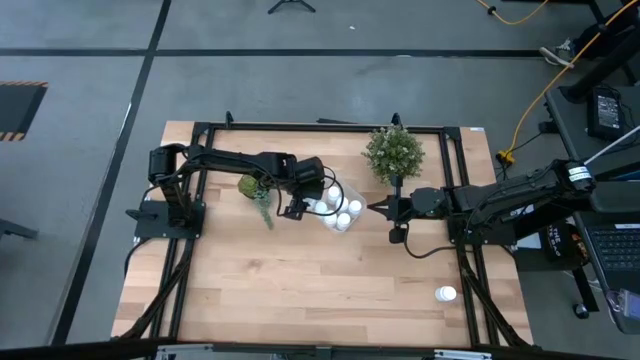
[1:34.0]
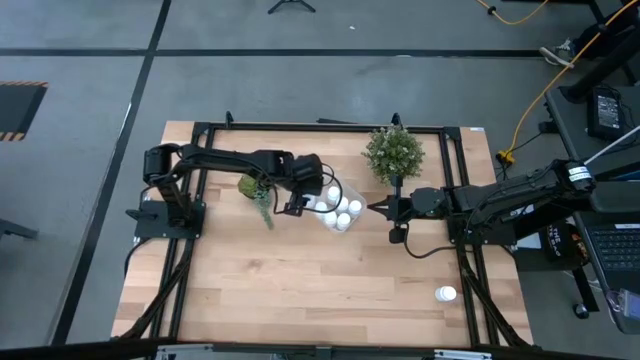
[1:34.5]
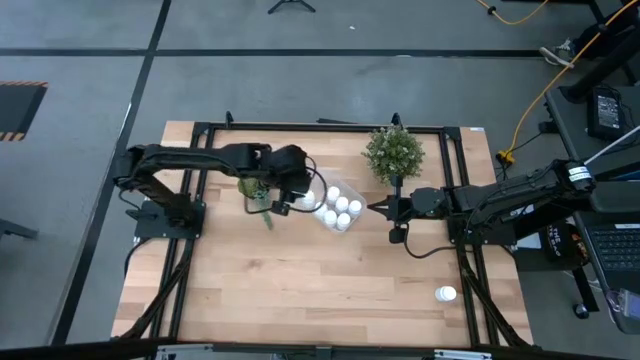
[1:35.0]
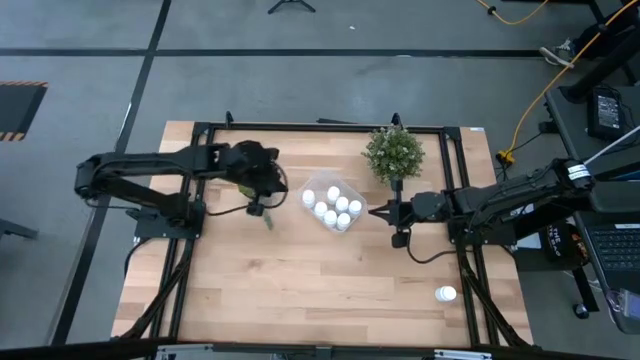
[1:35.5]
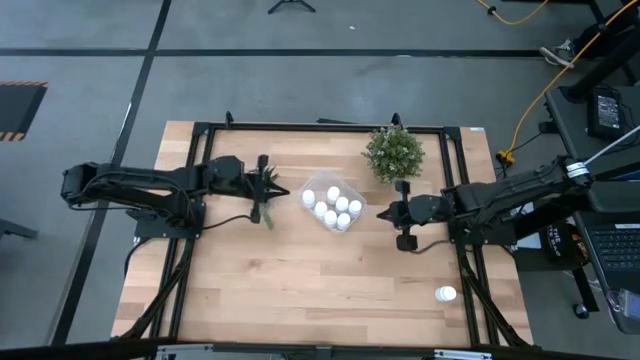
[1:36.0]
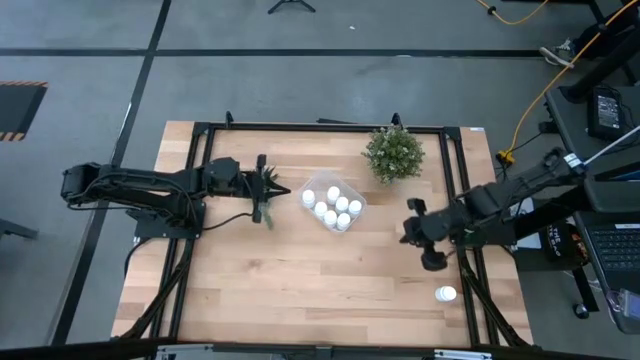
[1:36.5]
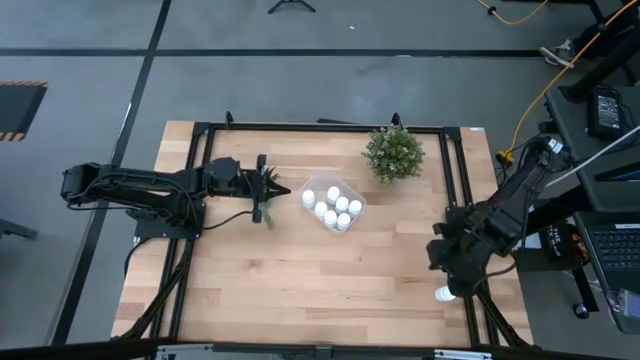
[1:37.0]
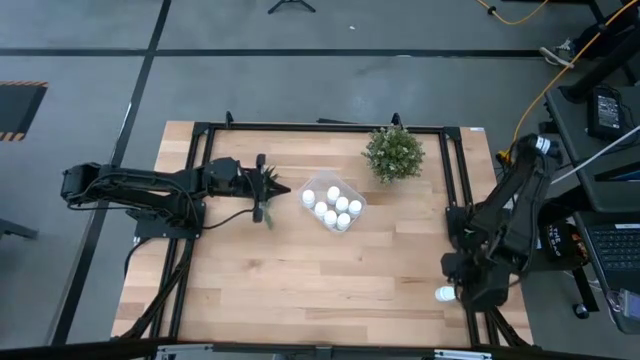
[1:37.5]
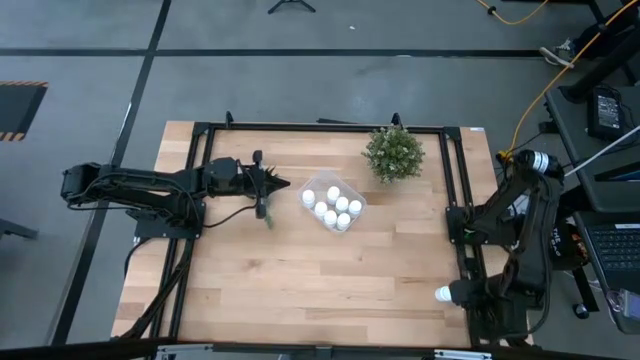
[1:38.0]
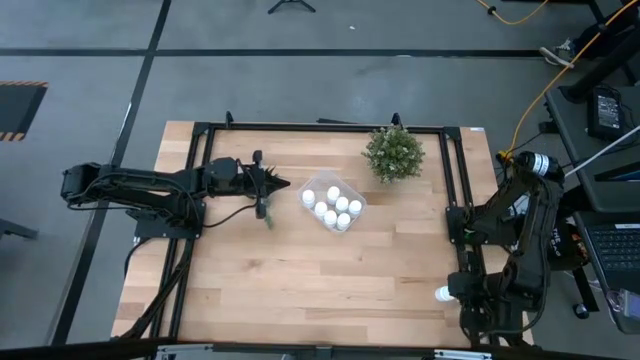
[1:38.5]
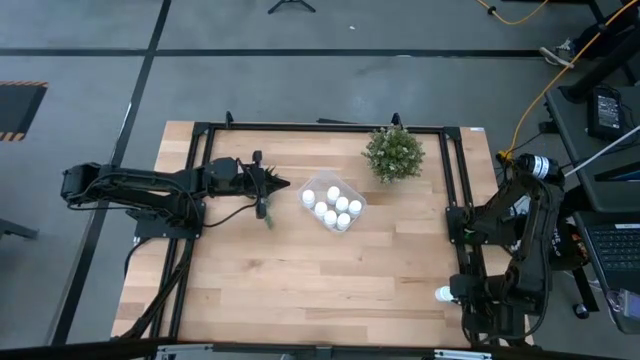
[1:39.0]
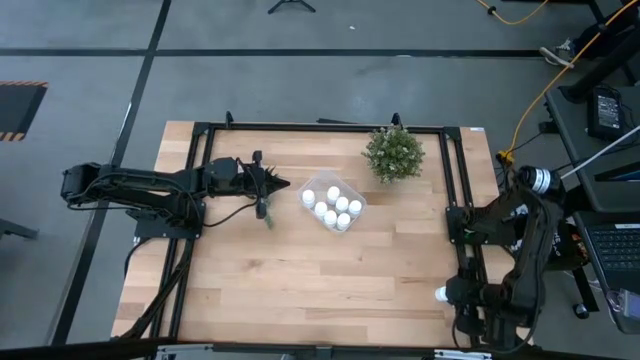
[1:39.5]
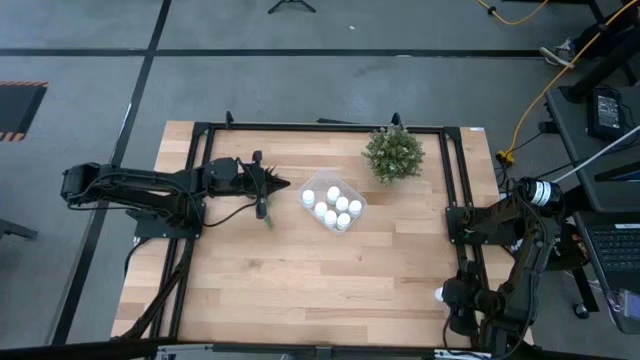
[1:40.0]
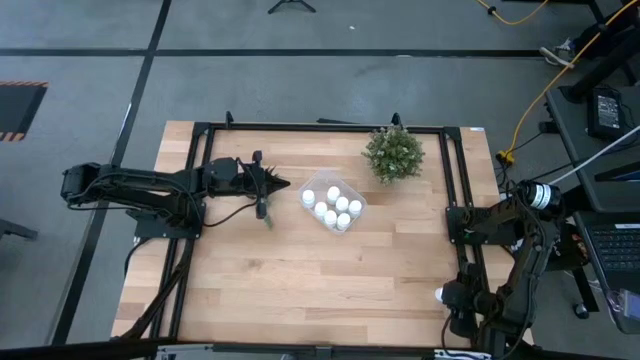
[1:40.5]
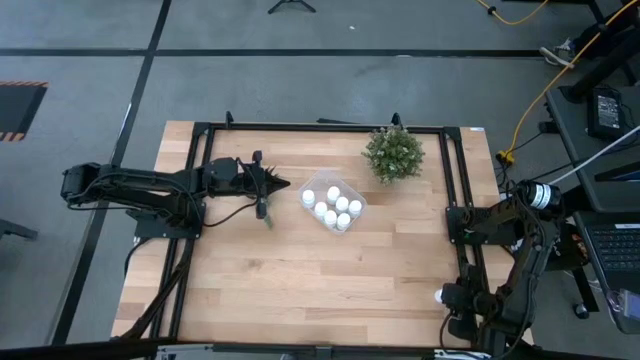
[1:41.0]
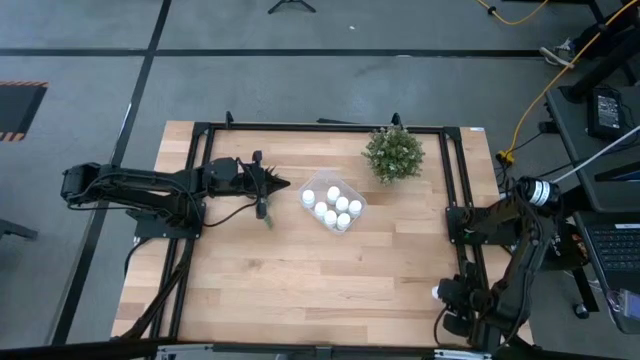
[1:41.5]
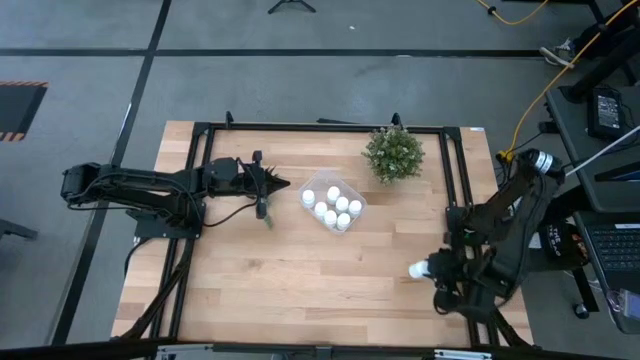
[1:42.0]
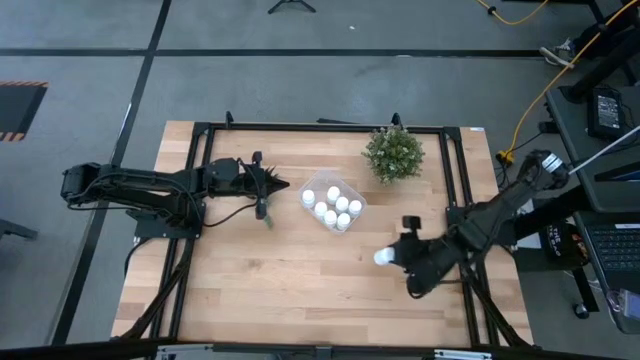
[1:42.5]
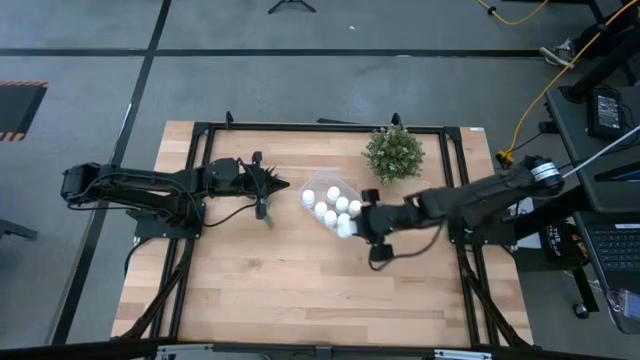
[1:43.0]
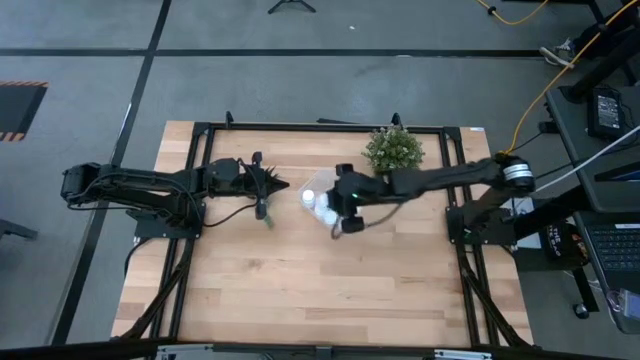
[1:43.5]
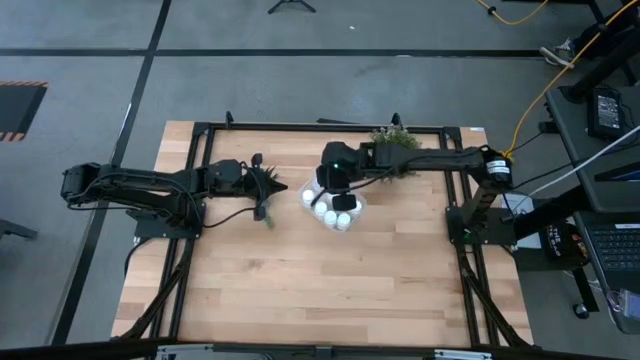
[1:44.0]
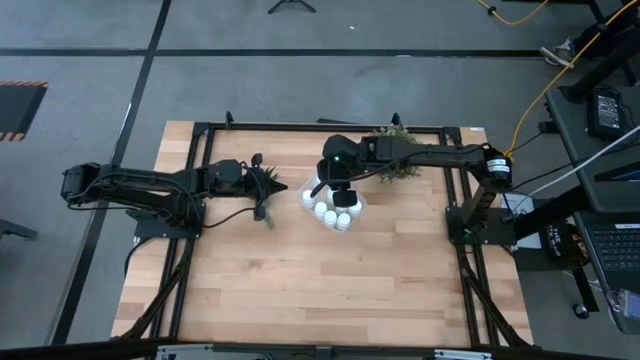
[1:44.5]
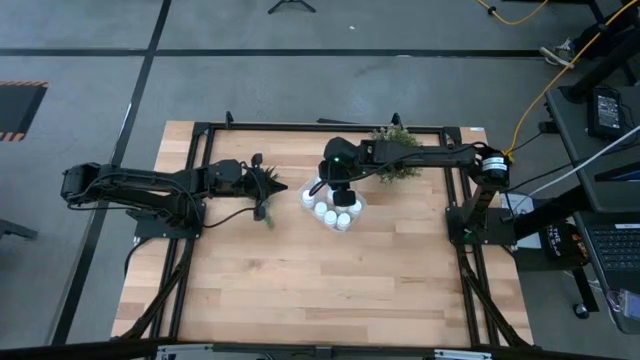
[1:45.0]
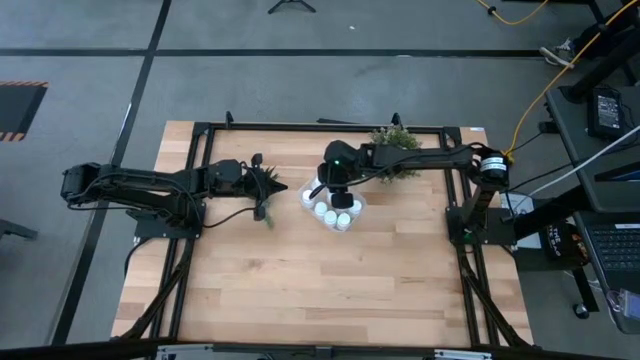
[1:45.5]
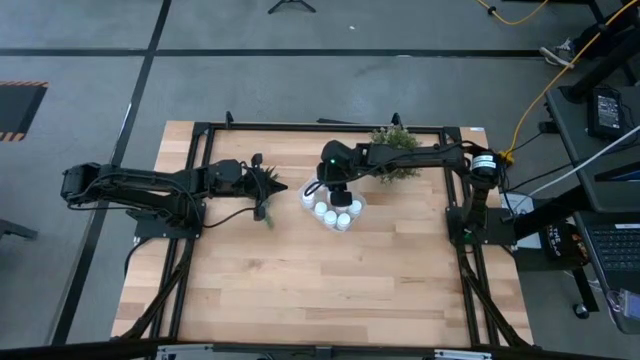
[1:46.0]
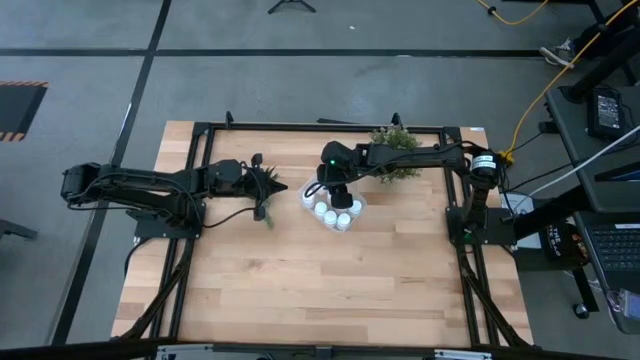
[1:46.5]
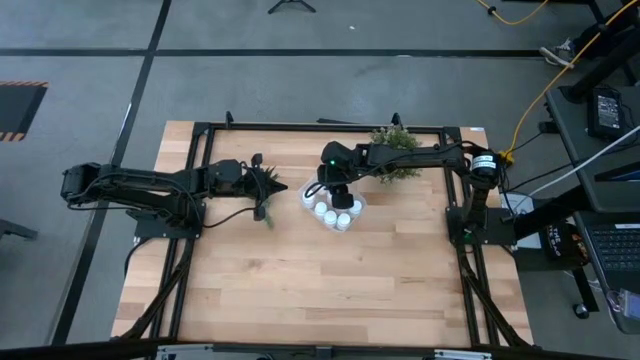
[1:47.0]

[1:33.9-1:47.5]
Task: Pick and place pill bottles into a basket
Put the pill bottle into the transparent bin

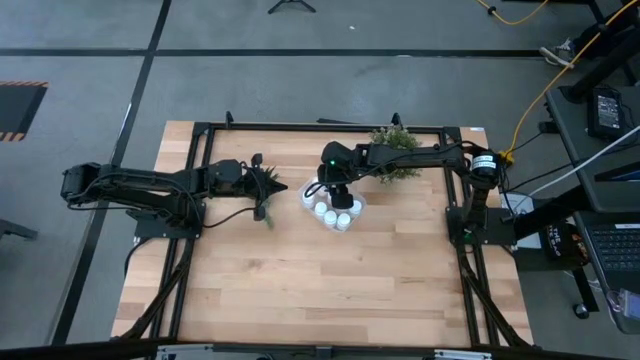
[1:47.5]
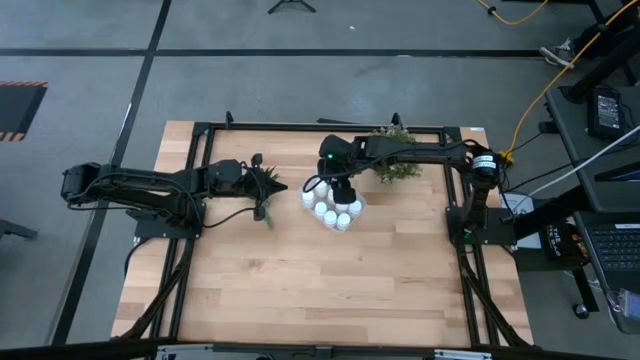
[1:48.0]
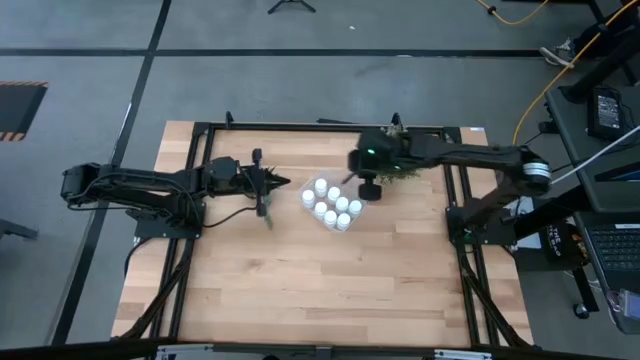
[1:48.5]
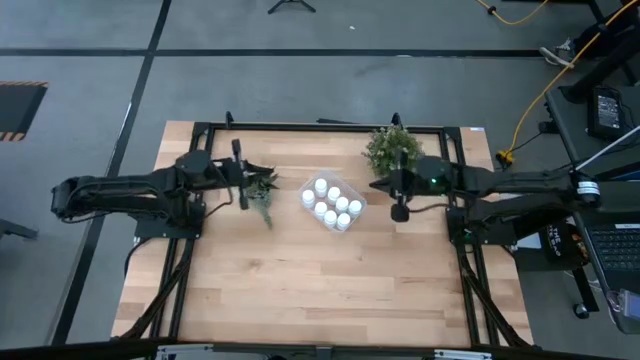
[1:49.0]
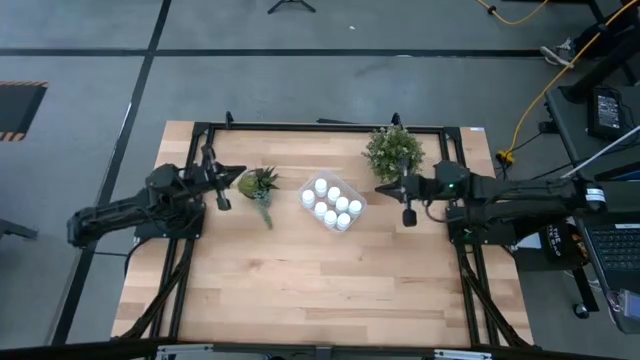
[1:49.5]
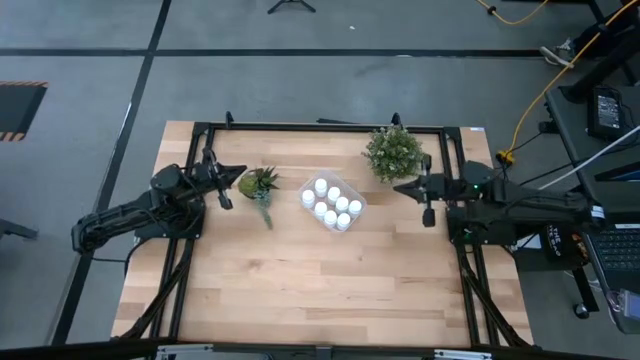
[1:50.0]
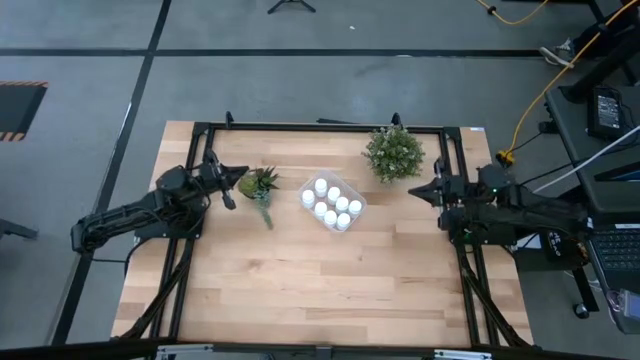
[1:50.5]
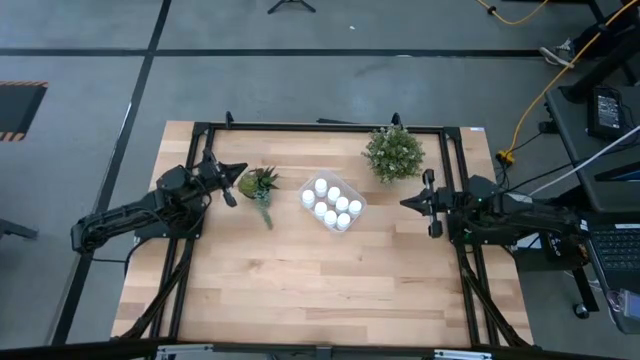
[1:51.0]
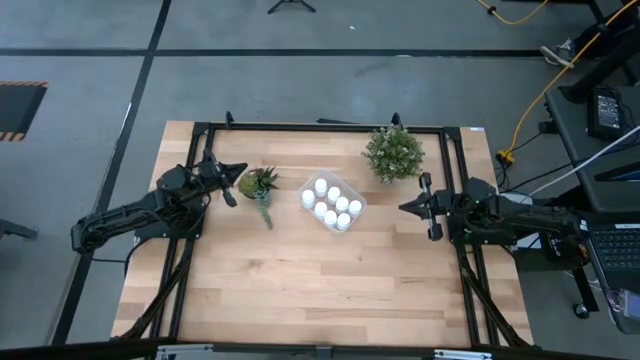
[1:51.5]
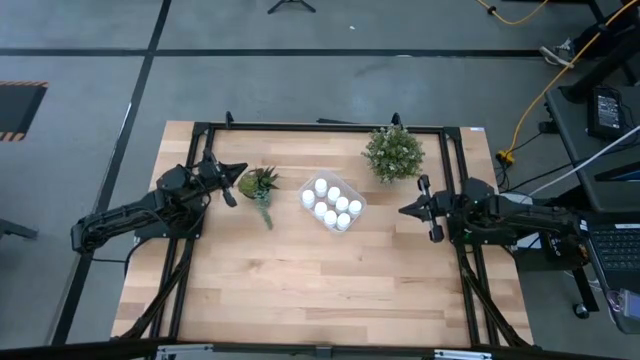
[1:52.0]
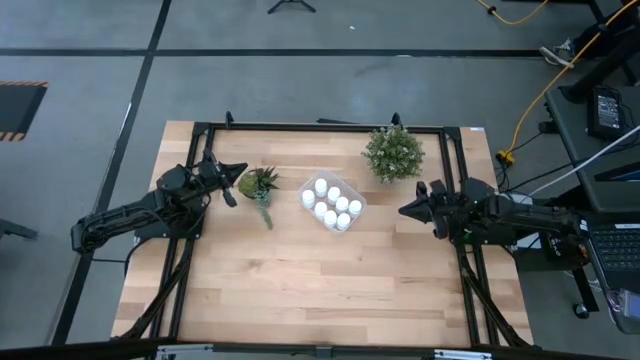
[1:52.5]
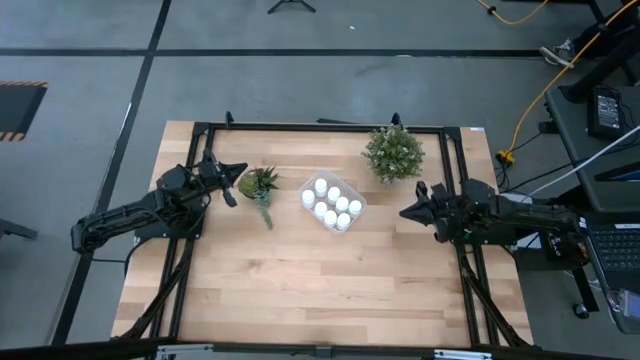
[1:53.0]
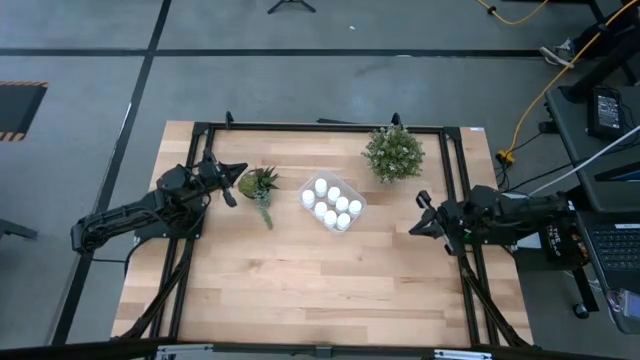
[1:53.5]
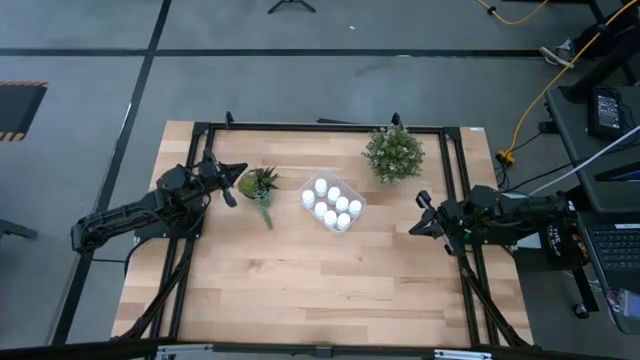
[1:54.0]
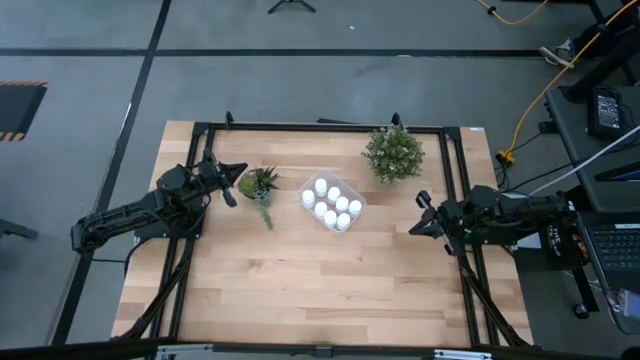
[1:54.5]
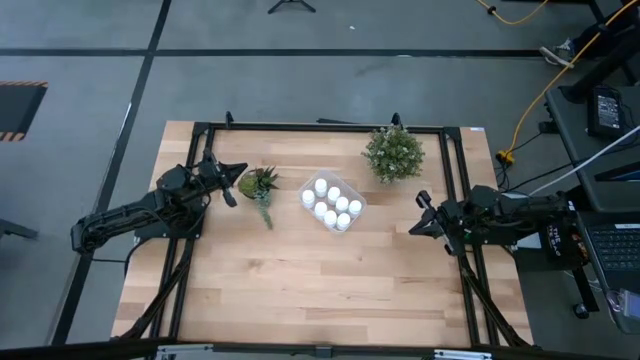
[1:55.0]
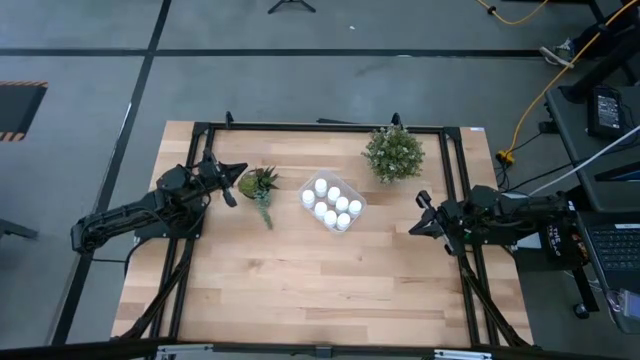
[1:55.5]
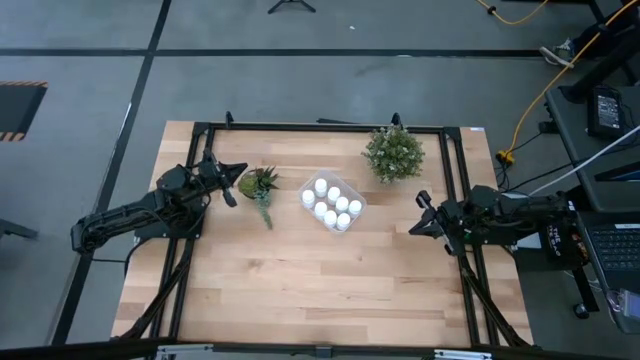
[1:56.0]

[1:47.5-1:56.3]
Return to Home Position
